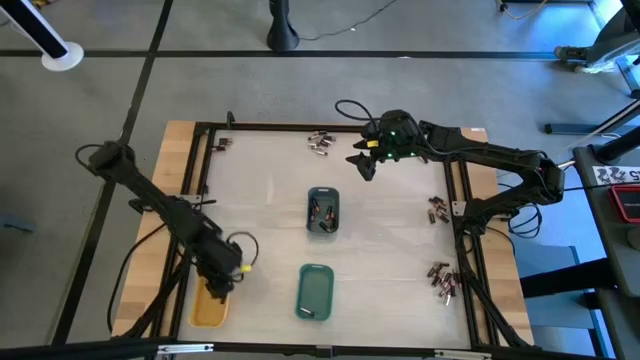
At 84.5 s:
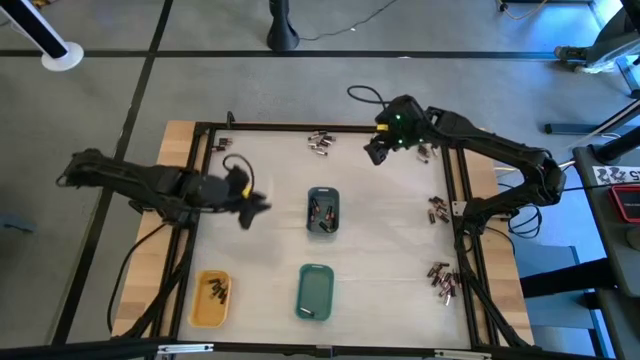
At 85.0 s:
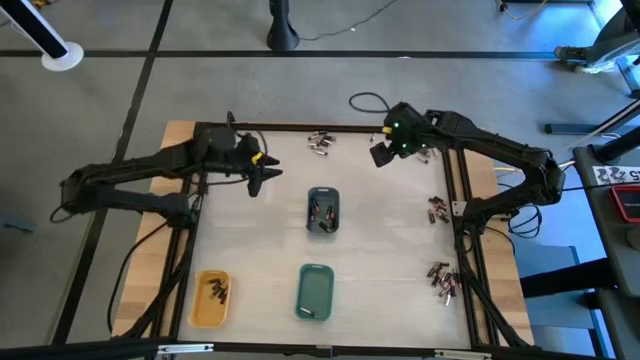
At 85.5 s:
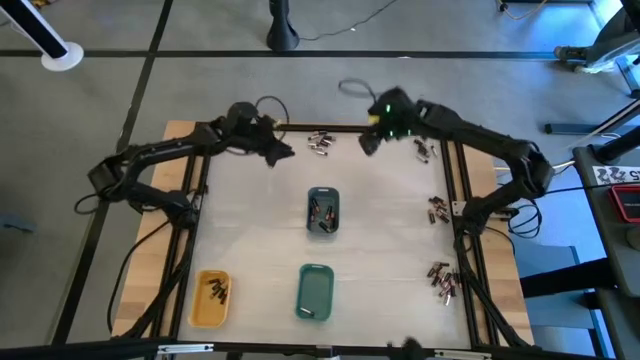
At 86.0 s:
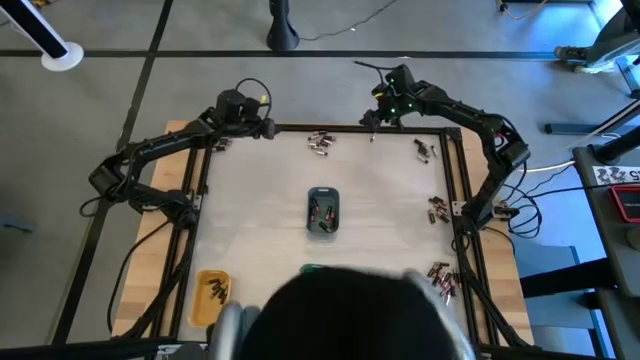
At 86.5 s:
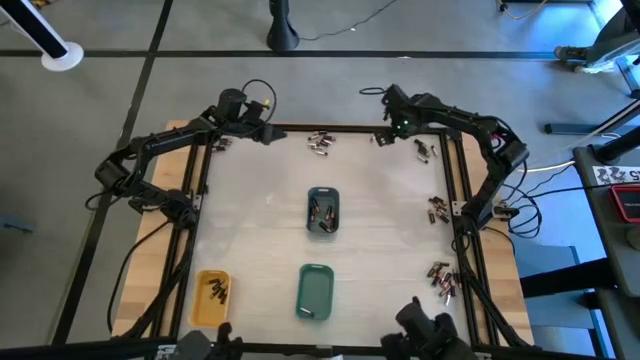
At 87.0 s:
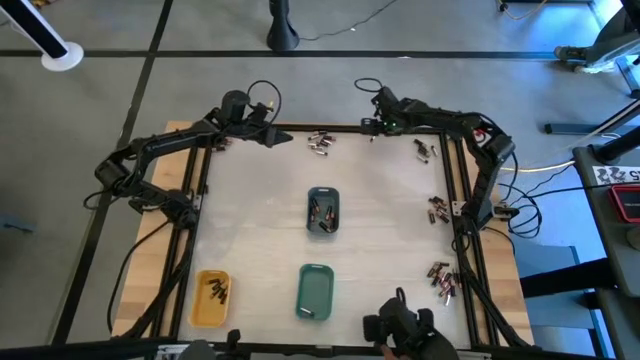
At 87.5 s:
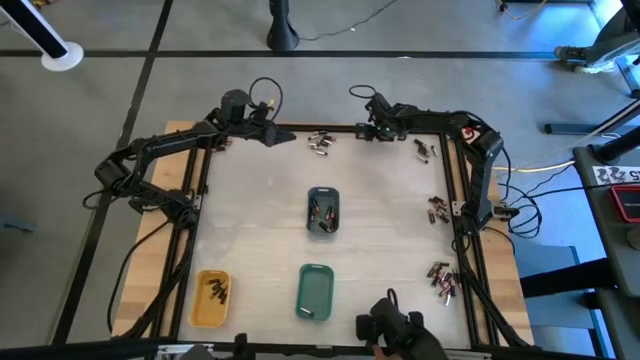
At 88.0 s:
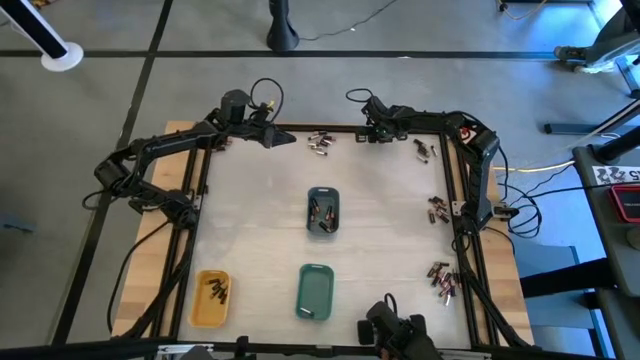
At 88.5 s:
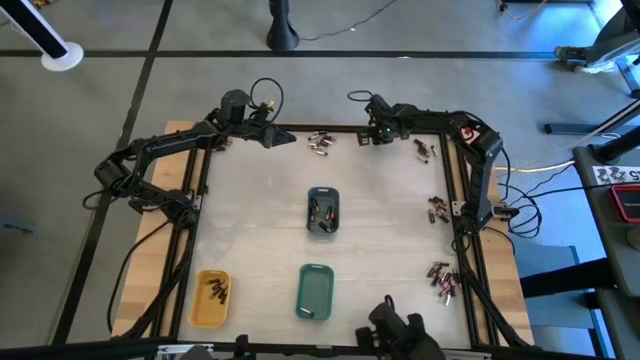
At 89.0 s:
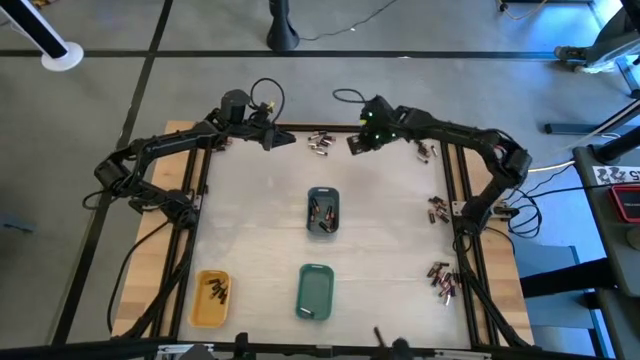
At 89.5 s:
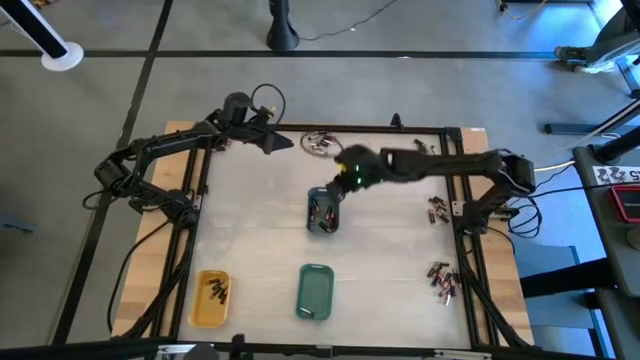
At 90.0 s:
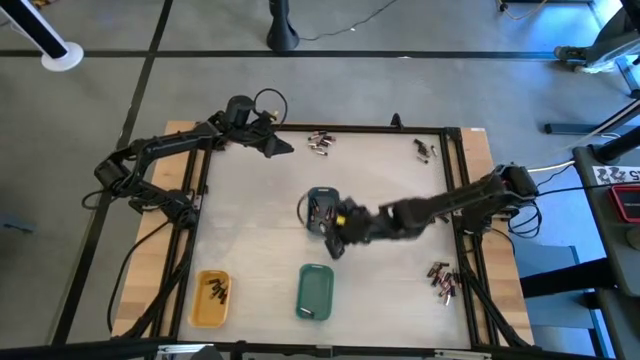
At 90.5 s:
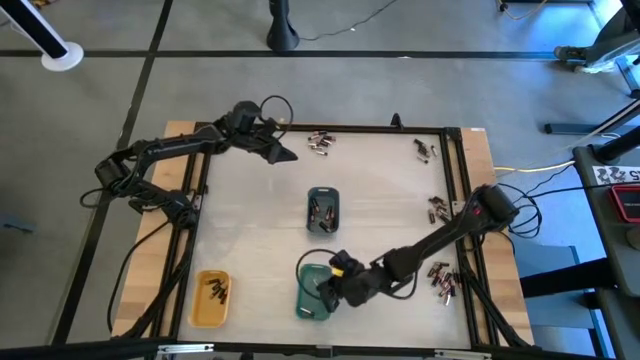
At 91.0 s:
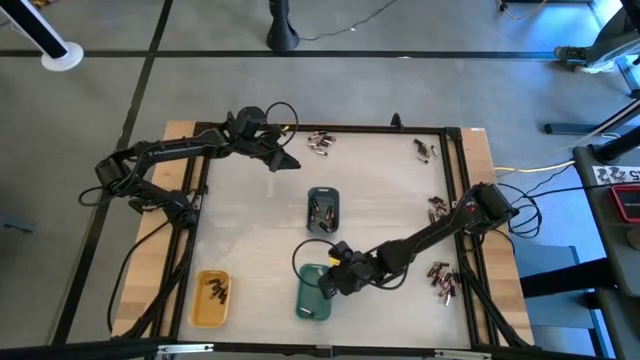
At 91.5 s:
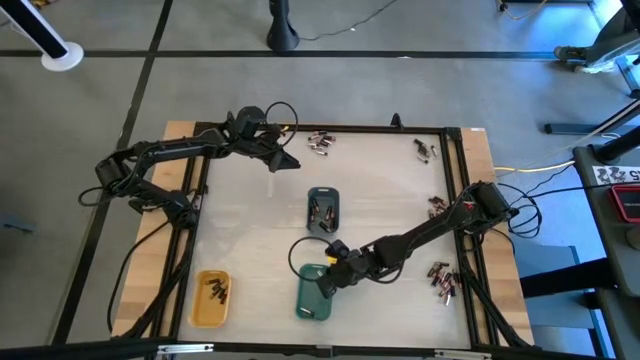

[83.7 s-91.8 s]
Task: Sort batteries
Put the silver battery into the green bin

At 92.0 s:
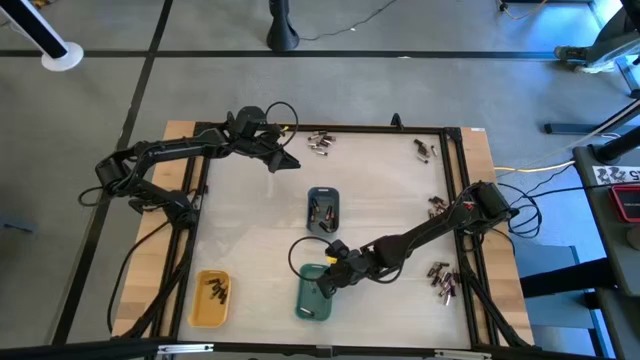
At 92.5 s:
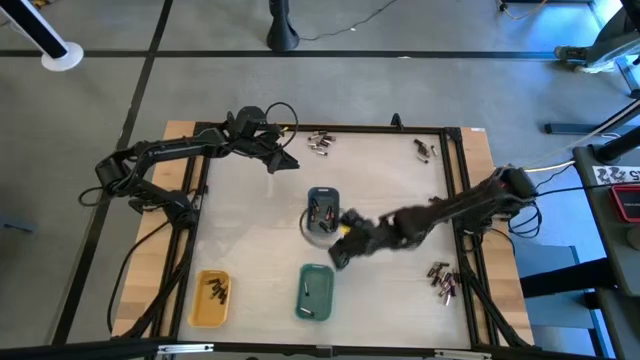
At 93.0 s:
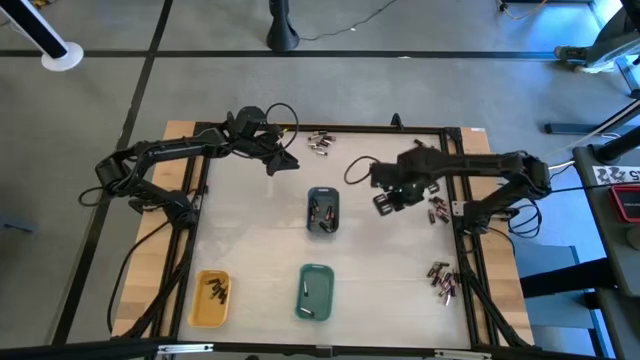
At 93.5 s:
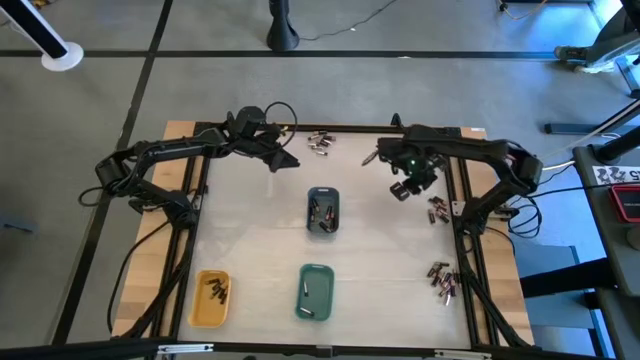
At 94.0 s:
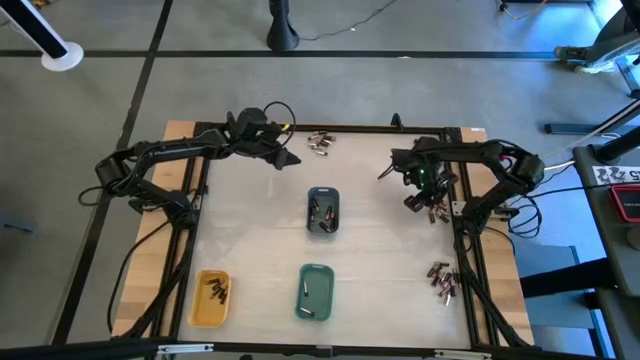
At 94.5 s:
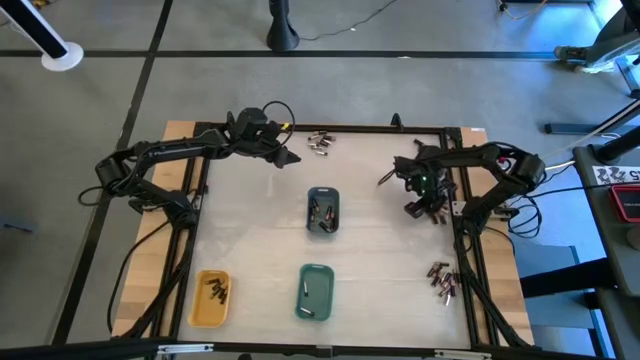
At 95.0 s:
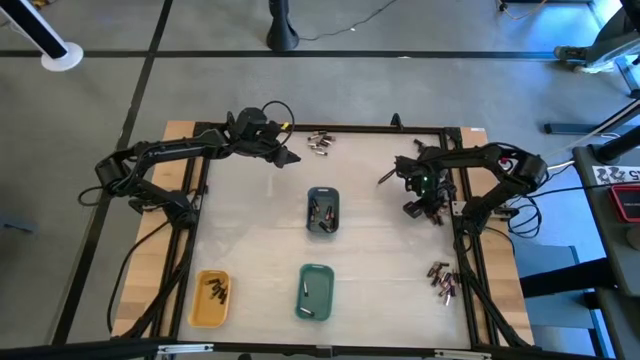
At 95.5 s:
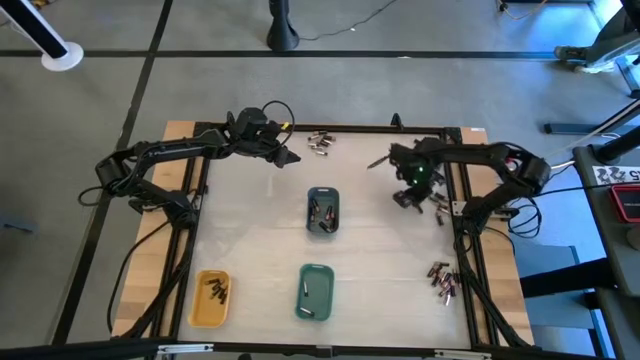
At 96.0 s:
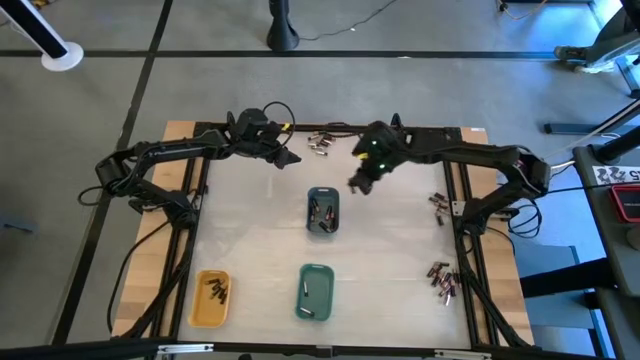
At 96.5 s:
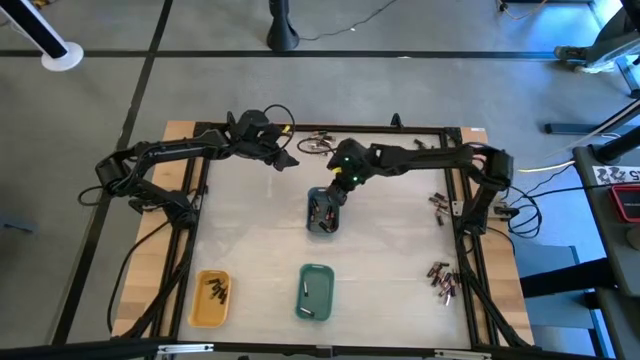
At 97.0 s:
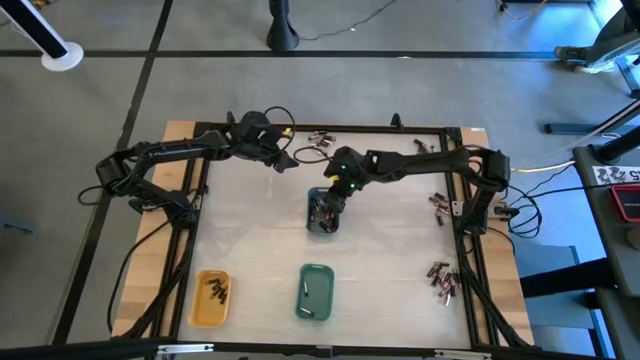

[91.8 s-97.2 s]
Put the large black battery into the blue bin

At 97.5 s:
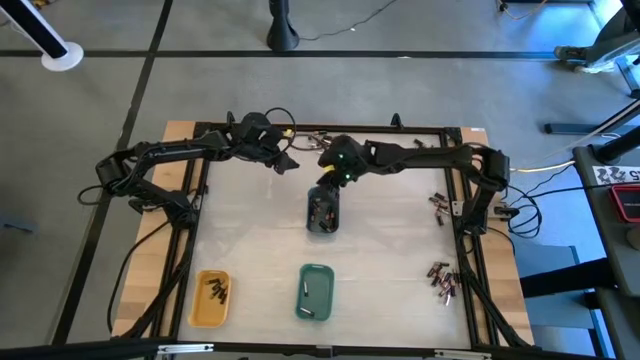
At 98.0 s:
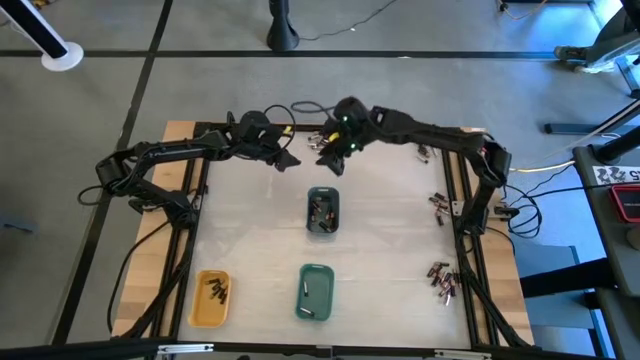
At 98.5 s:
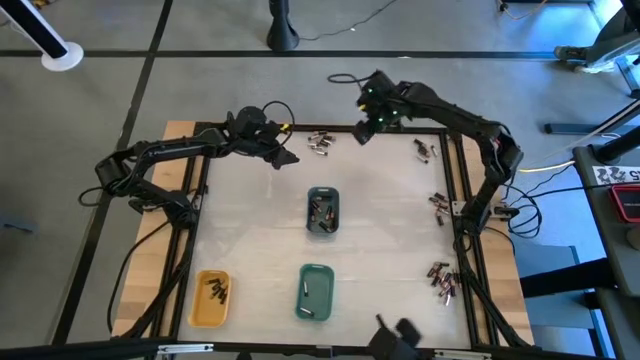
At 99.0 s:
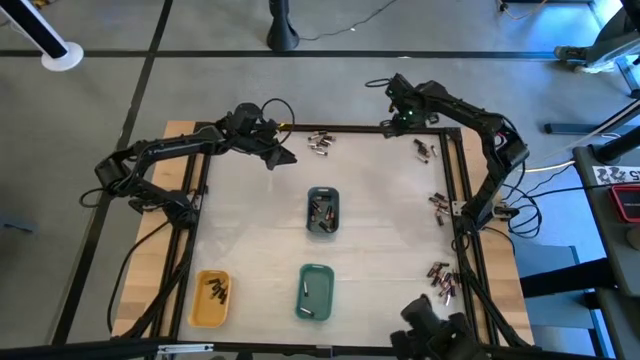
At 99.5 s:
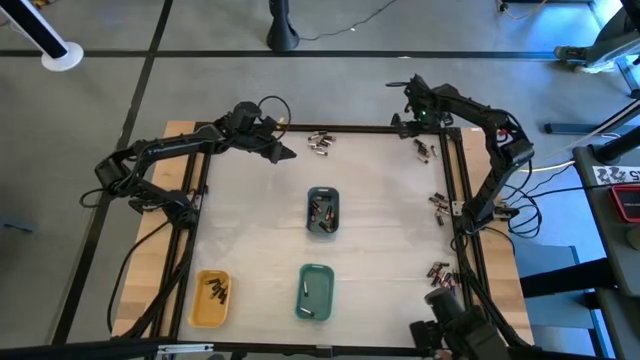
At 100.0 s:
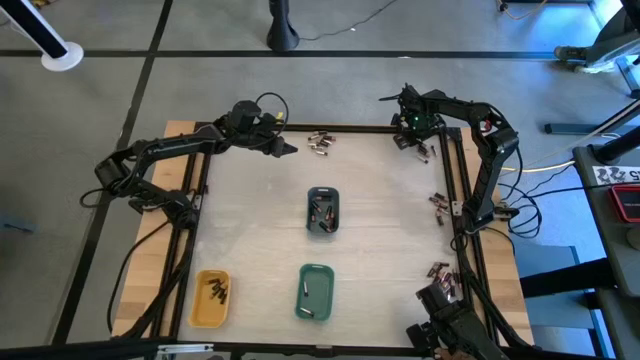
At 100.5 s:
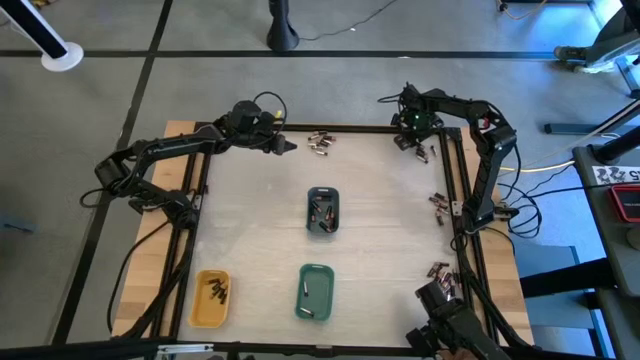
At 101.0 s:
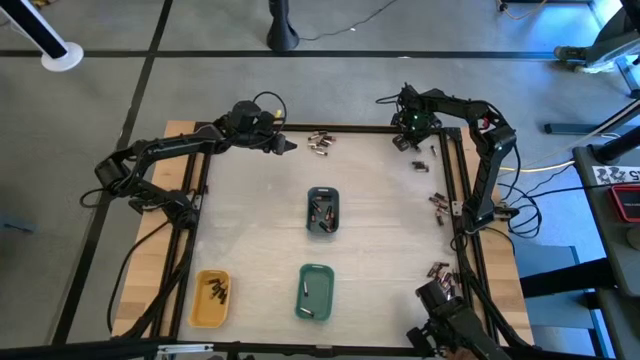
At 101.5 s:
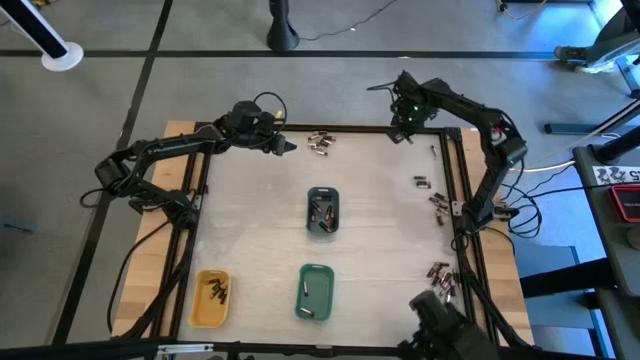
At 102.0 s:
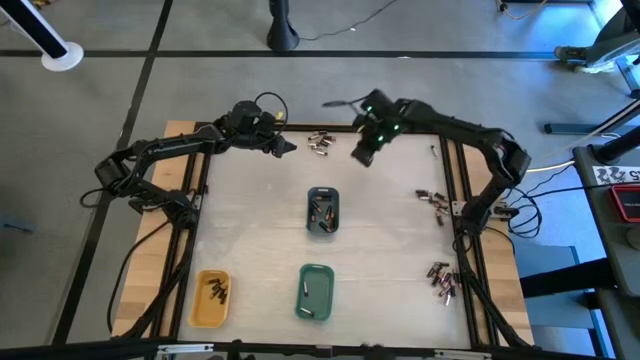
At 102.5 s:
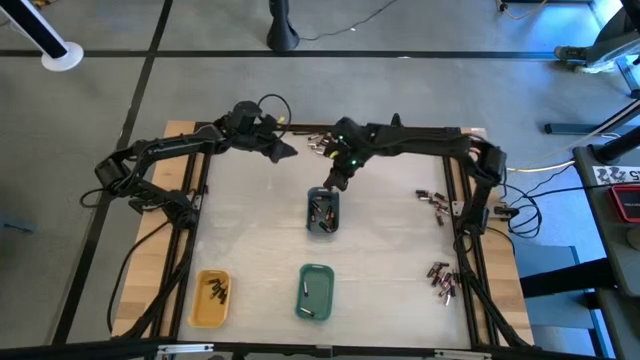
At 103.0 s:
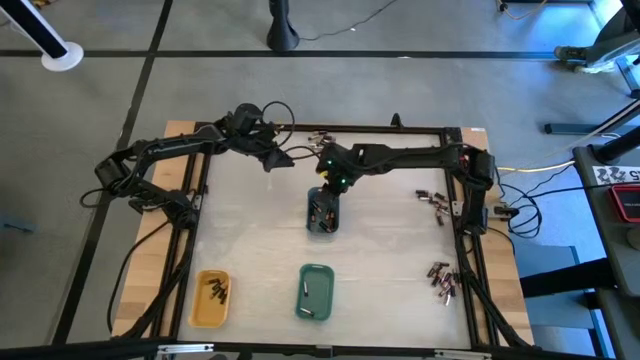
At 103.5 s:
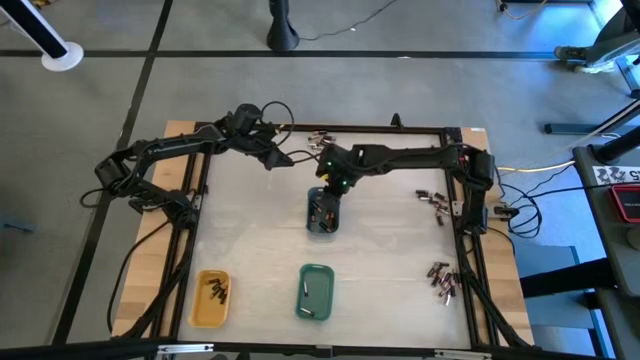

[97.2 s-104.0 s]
Put the large black battery into the blue bin
